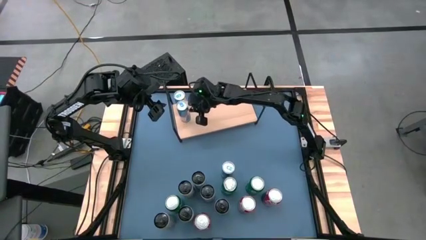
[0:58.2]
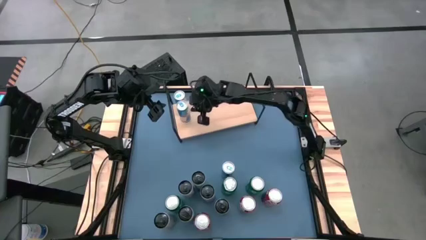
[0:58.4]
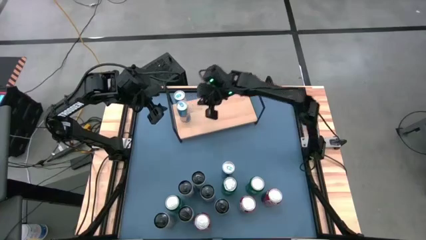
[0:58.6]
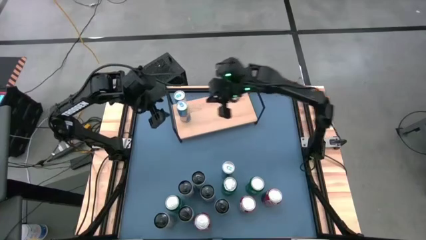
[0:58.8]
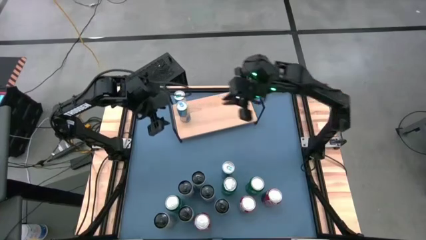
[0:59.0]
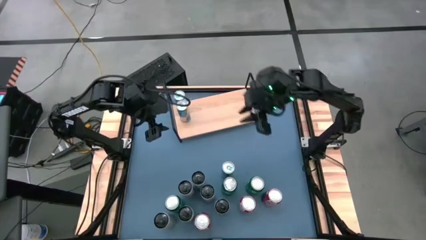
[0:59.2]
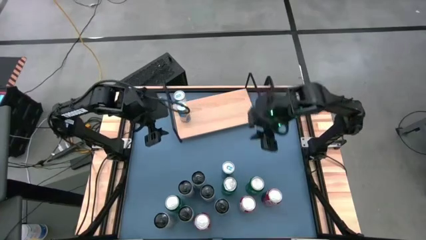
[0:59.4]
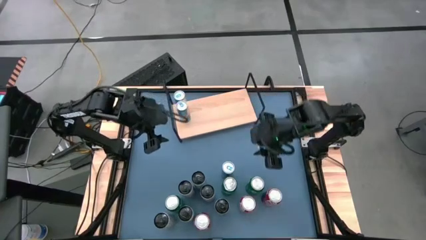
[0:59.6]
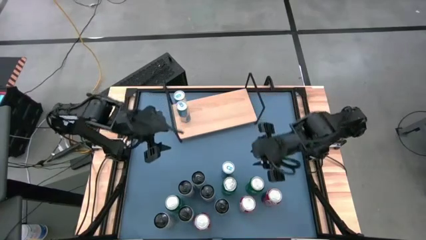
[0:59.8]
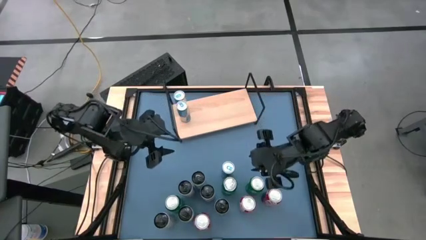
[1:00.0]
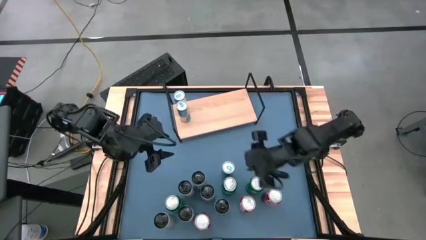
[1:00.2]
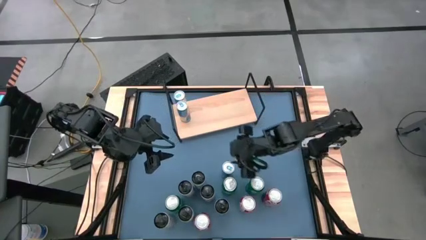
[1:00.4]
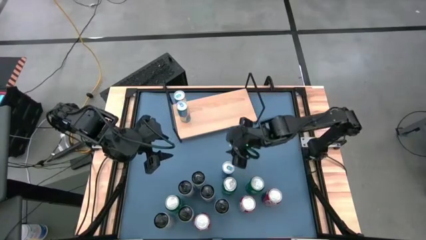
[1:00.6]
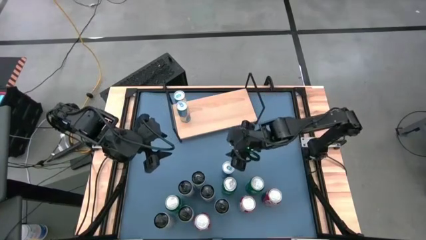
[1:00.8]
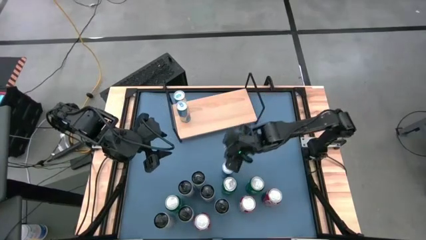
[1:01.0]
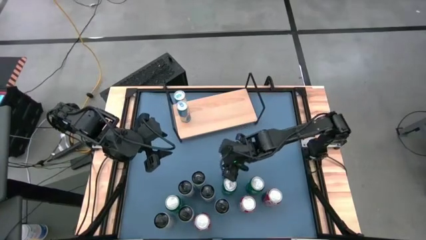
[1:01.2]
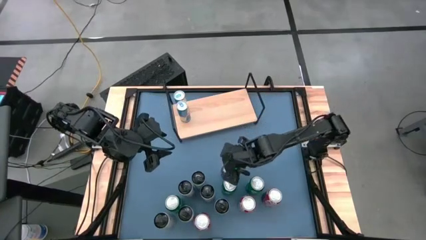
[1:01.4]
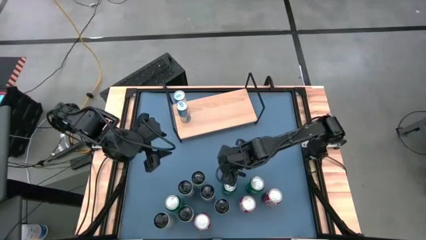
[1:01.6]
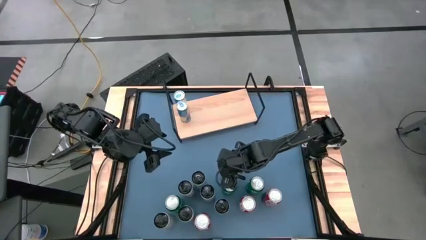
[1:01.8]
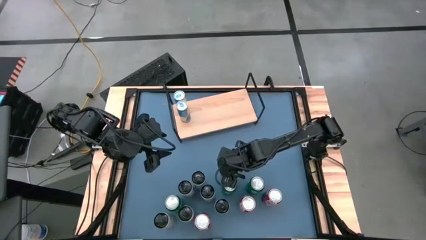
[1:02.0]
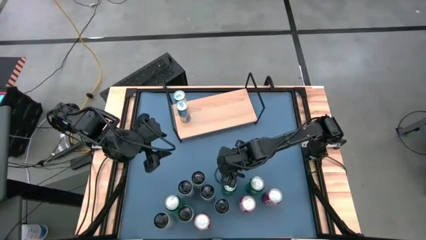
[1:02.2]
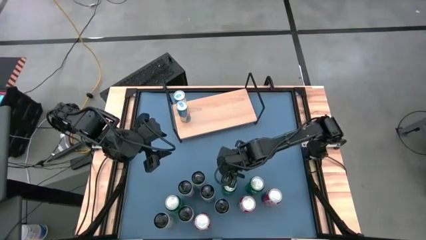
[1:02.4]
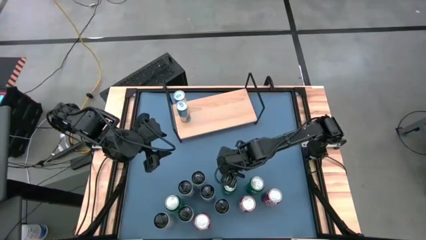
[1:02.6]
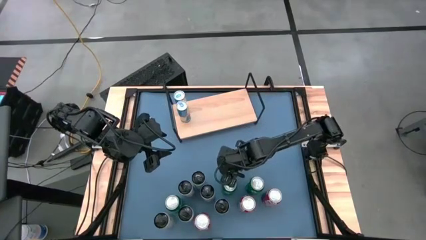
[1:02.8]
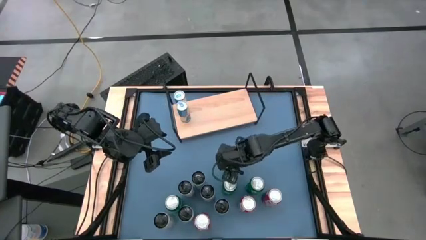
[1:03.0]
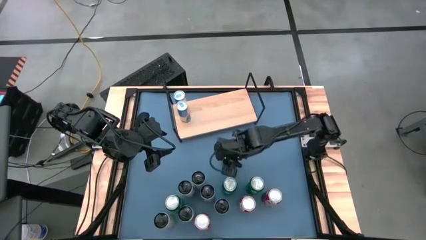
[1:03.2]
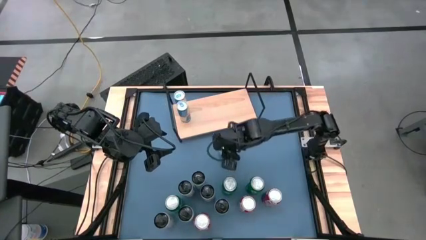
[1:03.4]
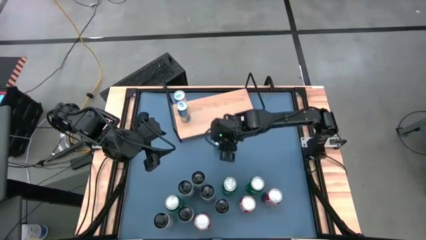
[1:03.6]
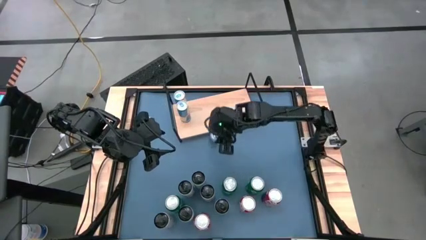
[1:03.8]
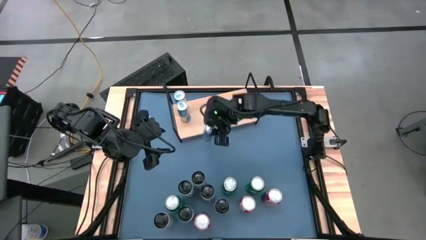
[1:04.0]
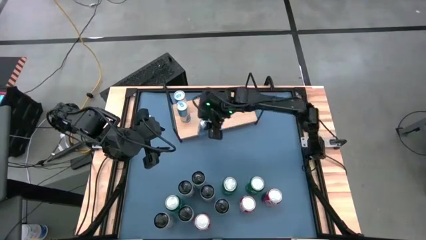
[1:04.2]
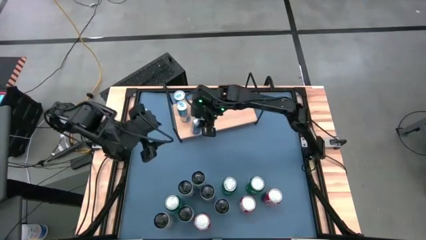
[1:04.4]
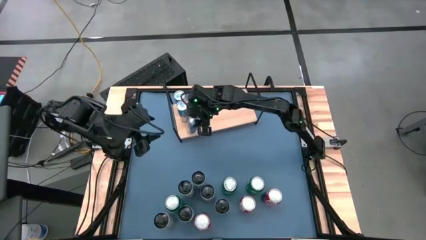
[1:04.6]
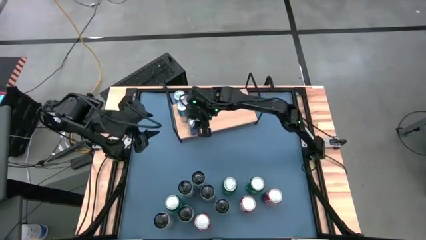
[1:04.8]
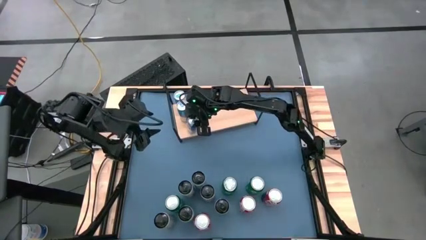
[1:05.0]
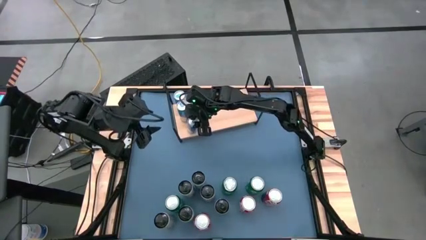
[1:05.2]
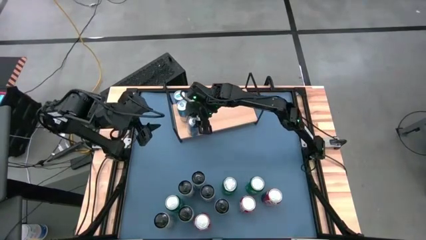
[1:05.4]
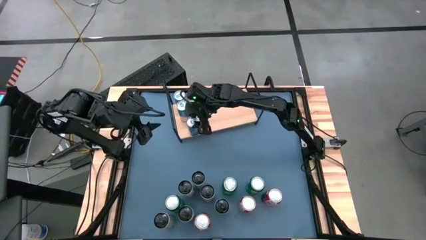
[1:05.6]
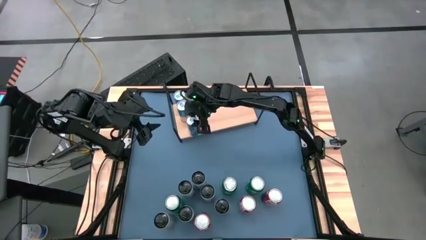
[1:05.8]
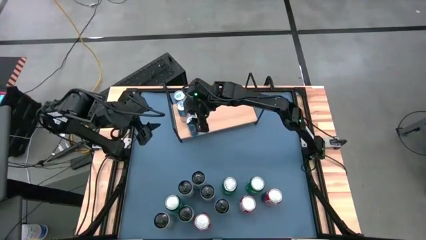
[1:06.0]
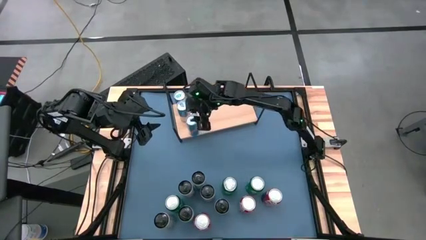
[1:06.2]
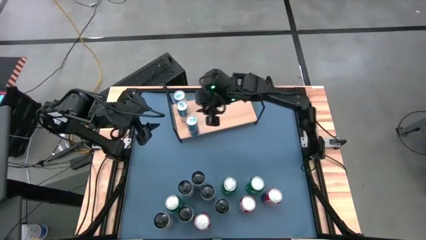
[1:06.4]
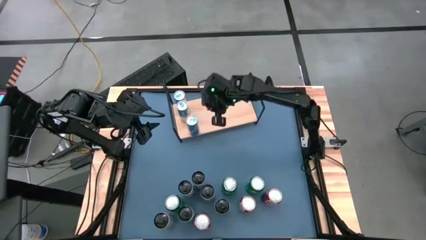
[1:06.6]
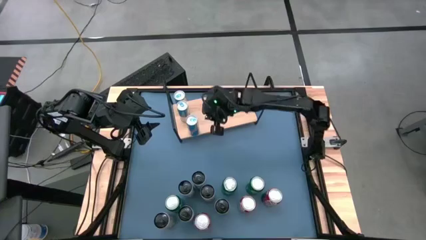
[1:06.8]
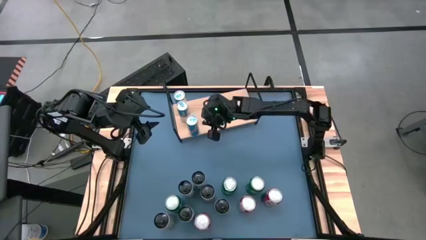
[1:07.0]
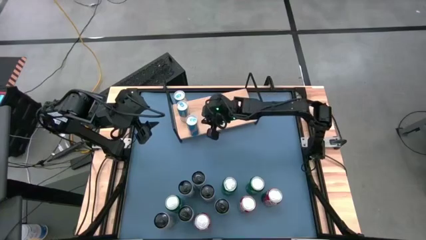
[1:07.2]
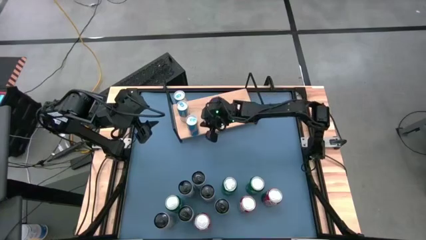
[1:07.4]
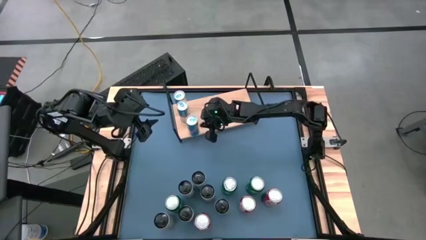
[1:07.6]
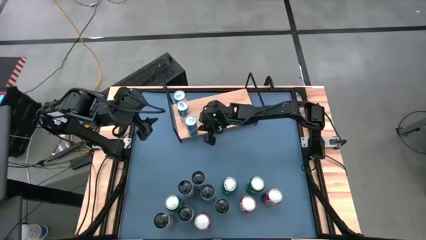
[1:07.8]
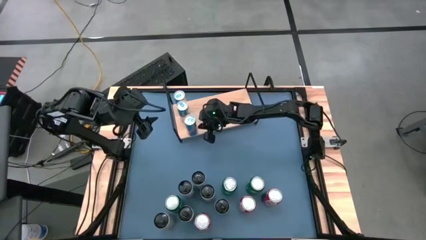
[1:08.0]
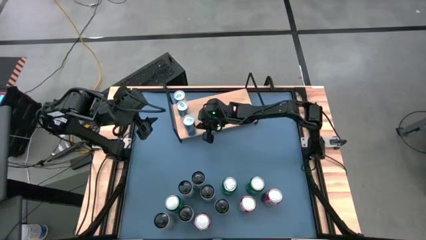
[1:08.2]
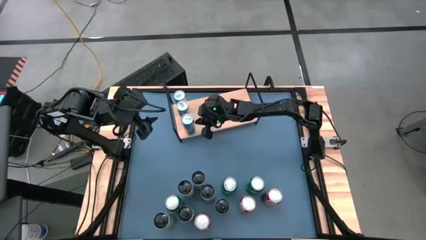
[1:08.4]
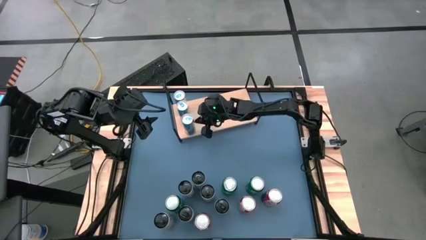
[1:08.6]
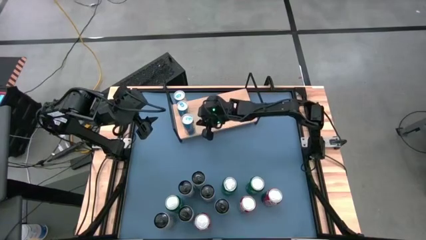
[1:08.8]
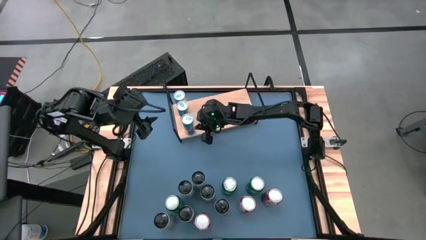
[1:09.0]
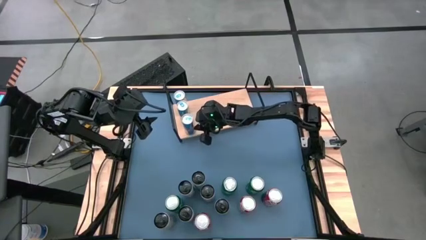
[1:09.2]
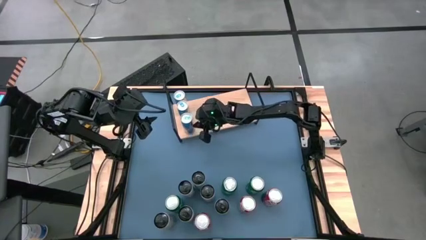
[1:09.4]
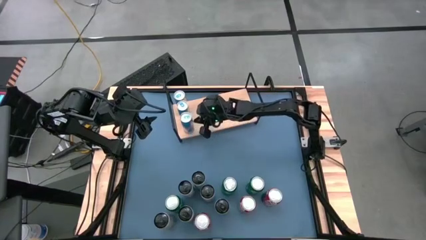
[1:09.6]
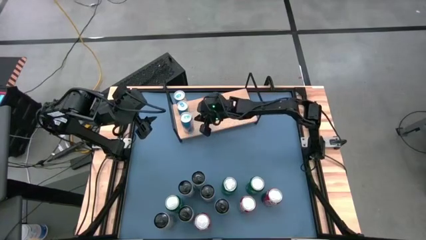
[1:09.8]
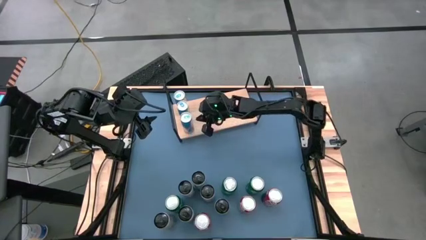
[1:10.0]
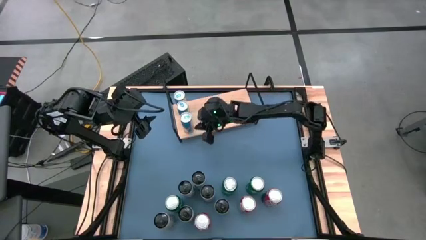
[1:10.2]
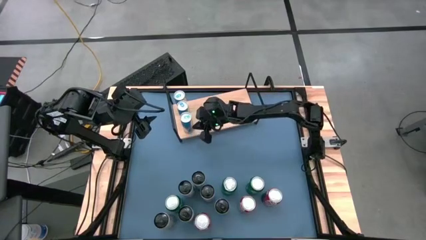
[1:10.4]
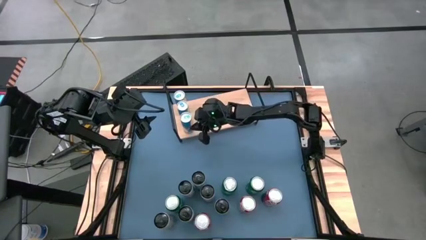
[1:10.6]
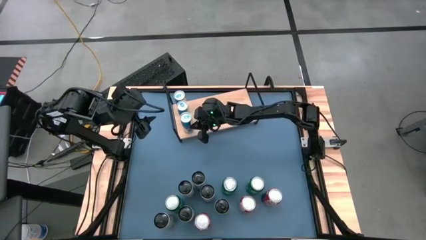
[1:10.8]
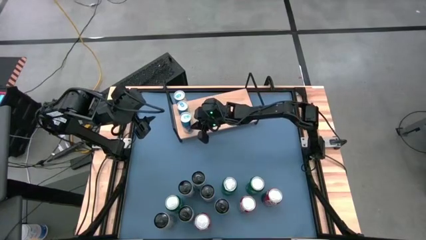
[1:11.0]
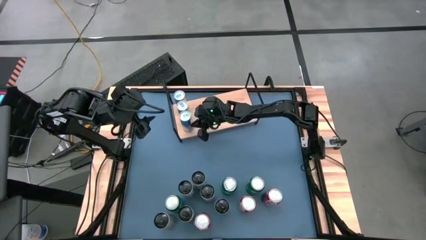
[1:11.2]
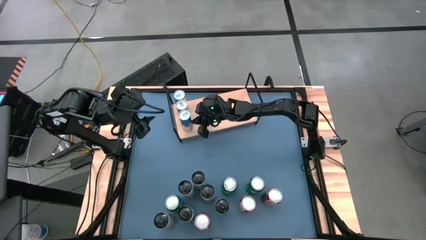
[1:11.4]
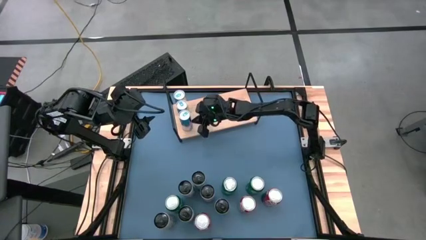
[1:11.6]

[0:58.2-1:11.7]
Task: Place canned beverage on shelf
Put the blue soda can on the shelf aligned with the other blue soda cans

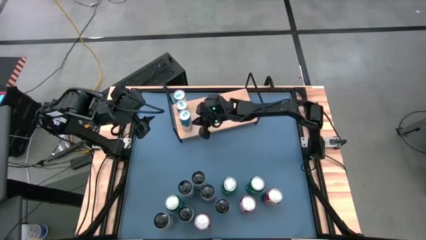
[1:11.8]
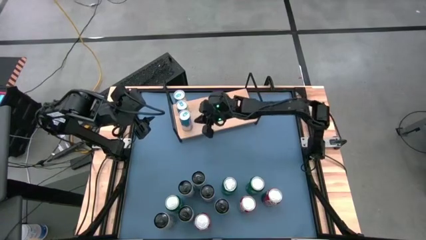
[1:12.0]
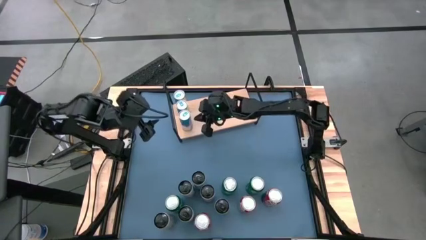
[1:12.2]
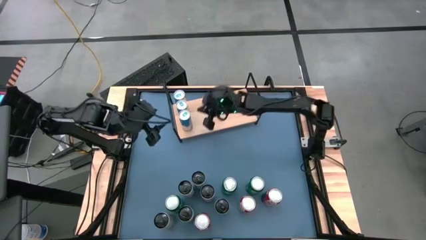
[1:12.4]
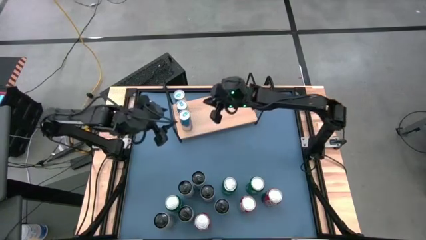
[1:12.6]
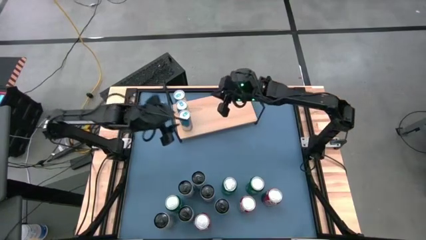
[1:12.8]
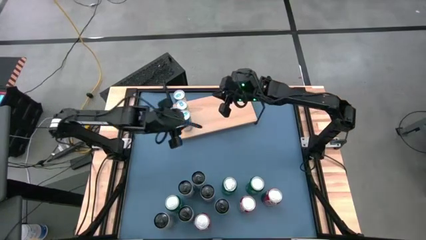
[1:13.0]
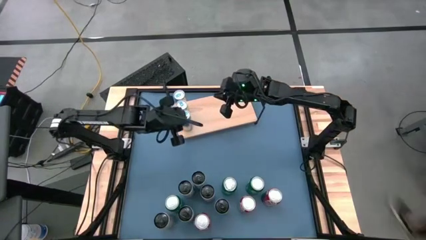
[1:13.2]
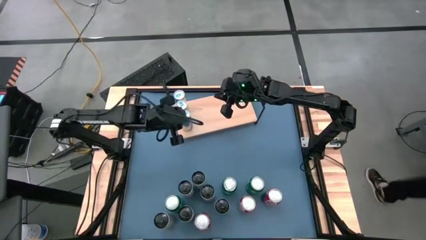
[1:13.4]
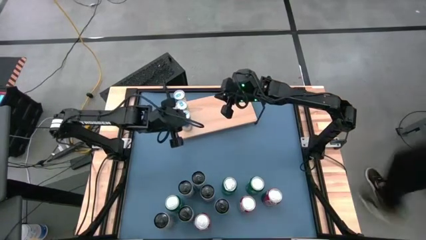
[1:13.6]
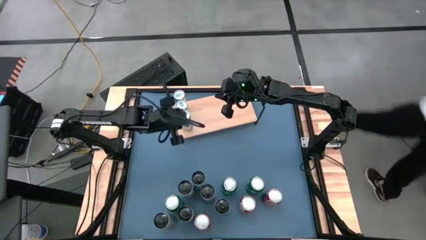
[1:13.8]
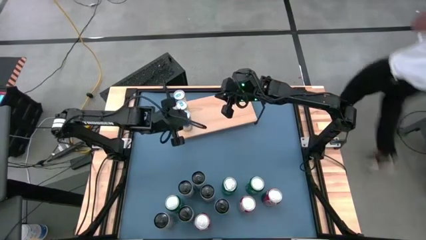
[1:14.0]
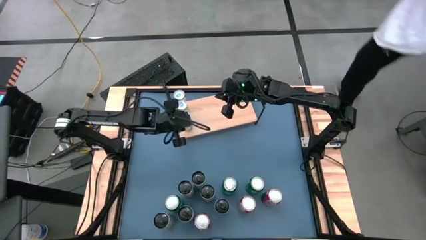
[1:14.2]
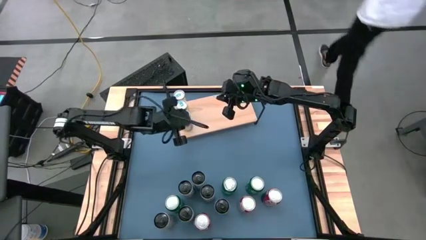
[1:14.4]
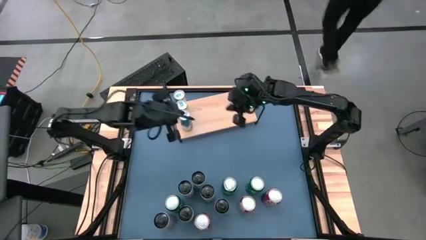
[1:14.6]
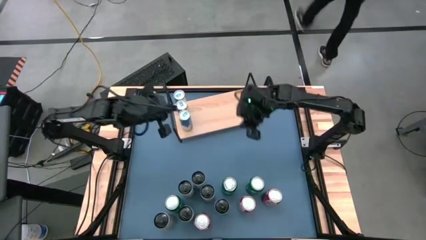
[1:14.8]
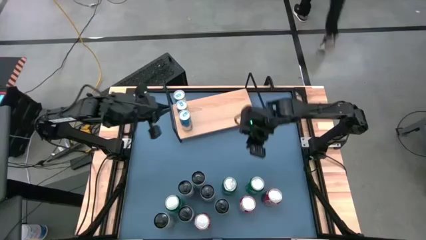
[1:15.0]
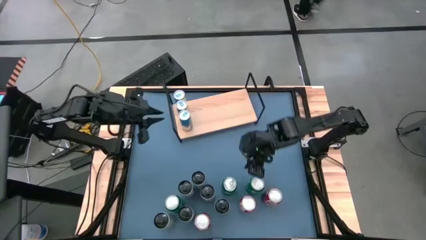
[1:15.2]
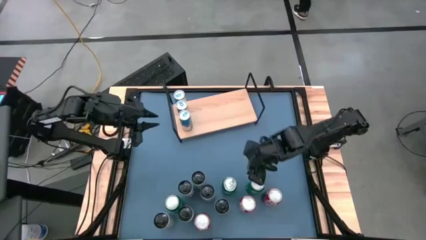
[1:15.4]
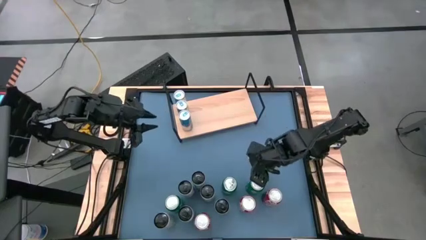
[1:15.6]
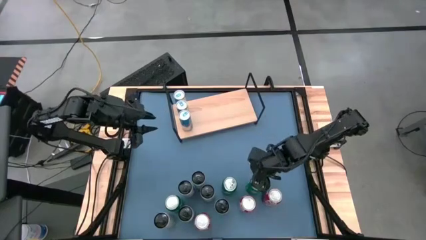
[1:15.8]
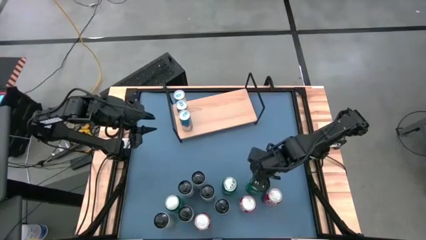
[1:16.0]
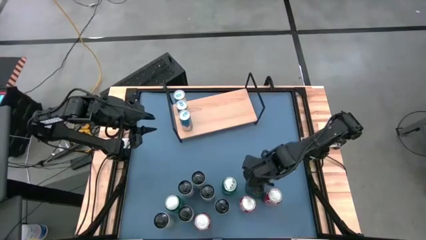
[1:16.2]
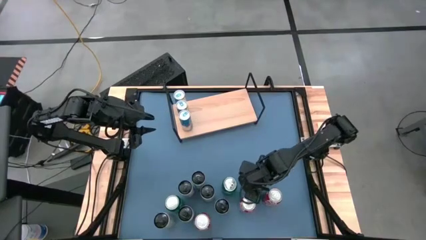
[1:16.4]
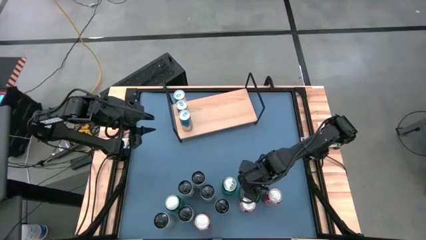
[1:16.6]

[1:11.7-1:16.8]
Put the top right green soda can on the shelf
